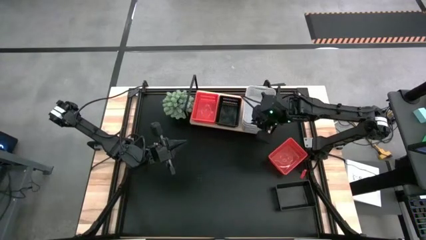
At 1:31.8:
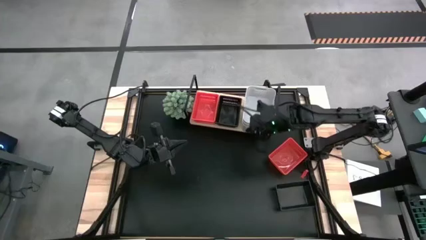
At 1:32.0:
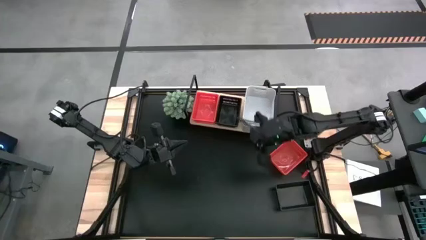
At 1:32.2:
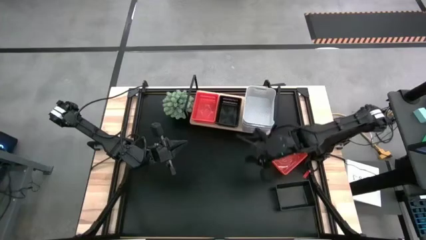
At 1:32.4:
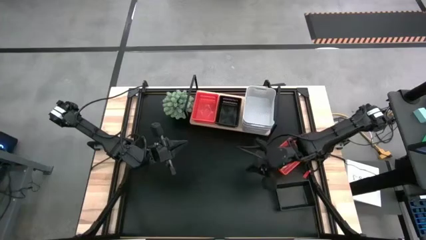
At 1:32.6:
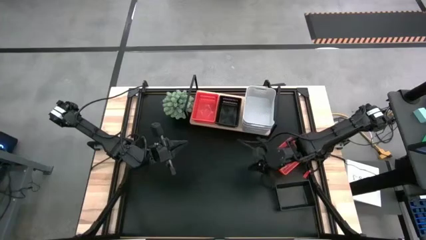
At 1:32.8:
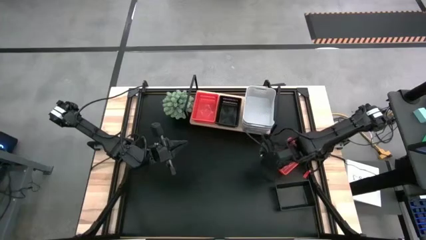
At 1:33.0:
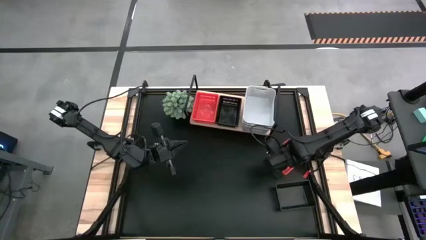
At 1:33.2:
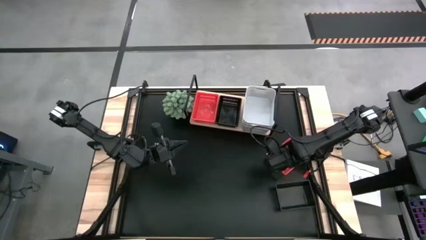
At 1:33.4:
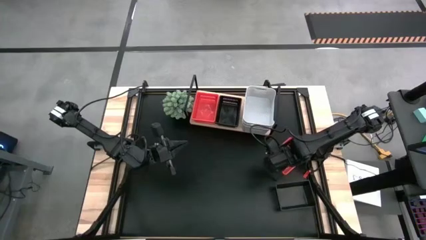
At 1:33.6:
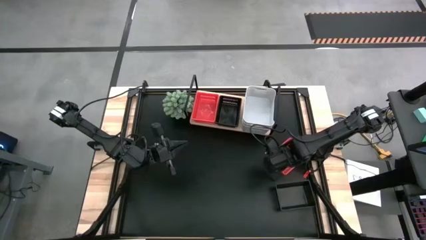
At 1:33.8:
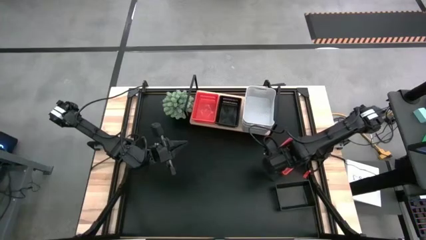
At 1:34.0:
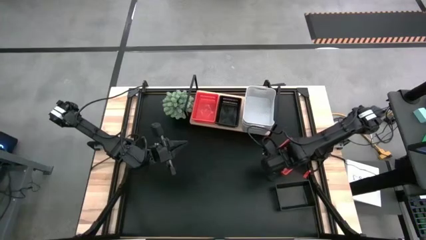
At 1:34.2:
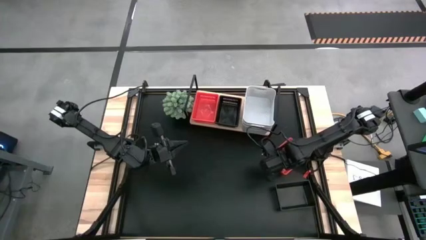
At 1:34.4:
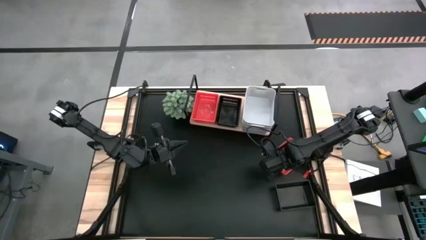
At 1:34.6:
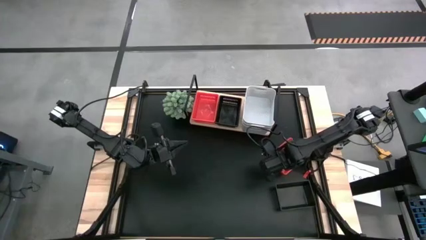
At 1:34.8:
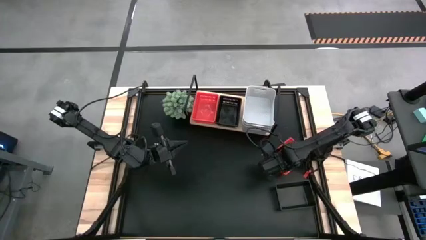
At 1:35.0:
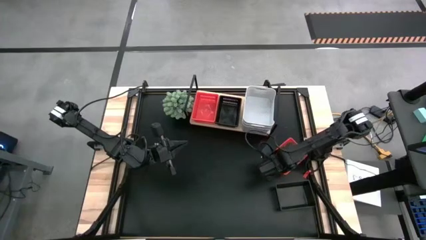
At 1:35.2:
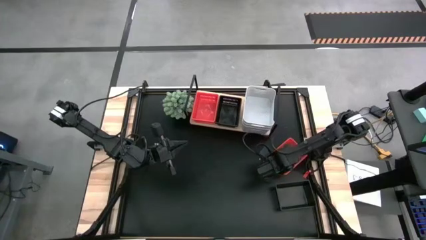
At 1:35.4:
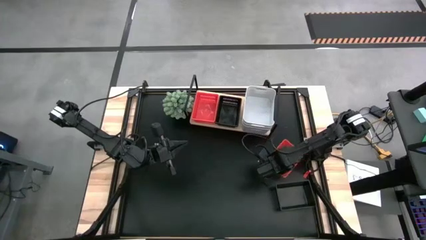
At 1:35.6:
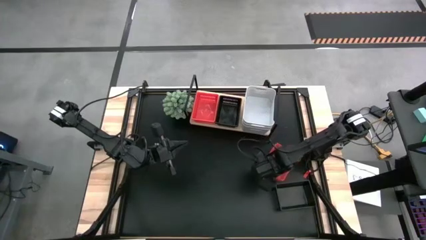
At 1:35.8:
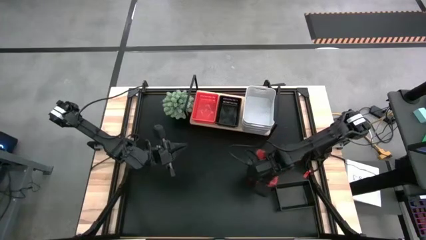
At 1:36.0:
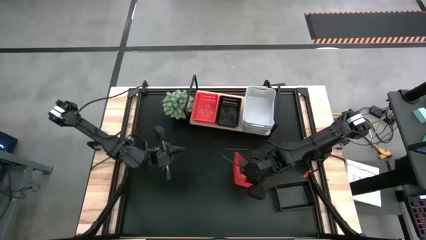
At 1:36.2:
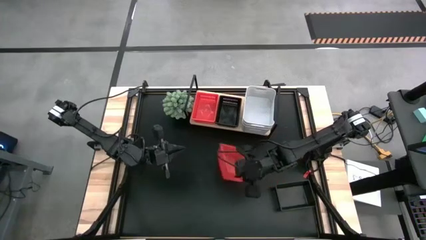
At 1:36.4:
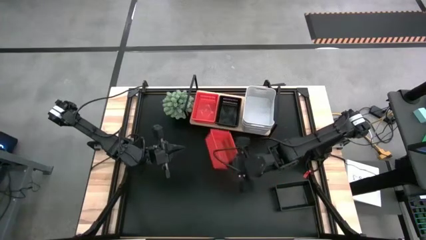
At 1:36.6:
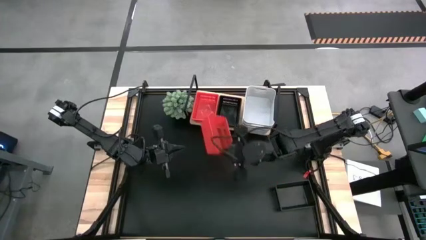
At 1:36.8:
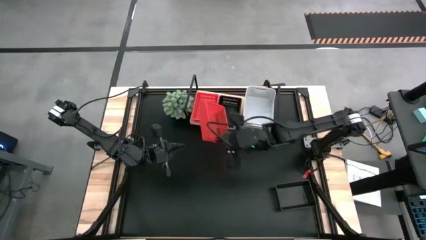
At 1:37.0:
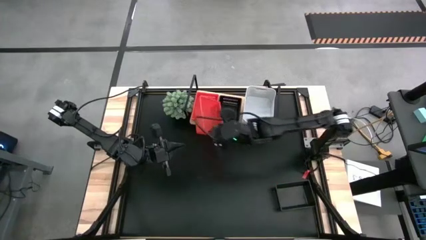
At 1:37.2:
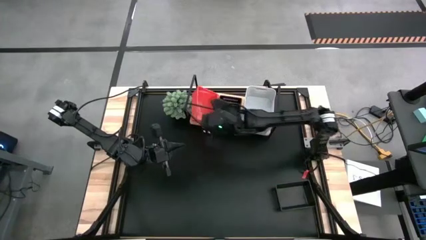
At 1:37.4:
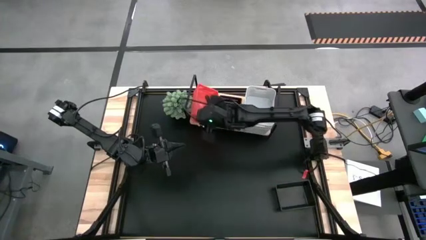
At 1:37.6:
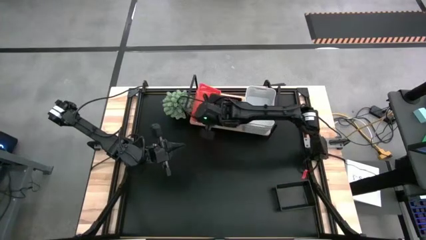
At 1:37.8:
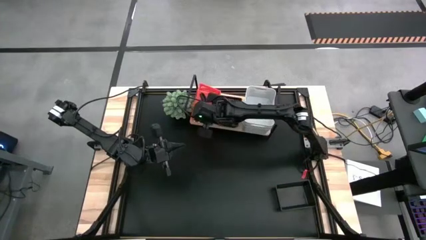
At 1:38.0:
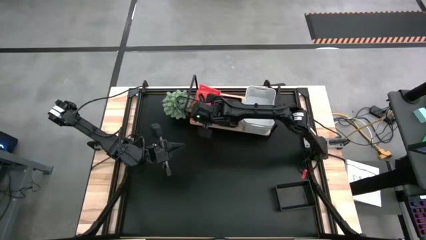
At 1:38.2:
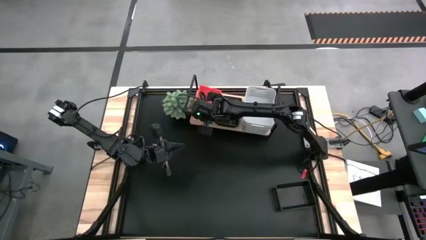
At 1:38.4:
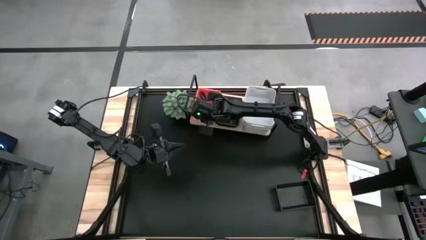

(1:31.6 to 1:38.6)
Task: Stack baskets on shelf by color
Stack the red basket on top of the red basket on the shelf

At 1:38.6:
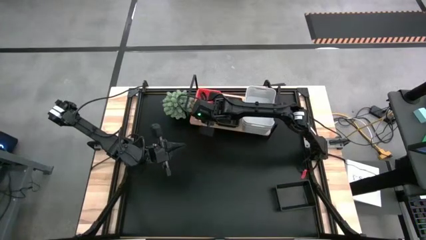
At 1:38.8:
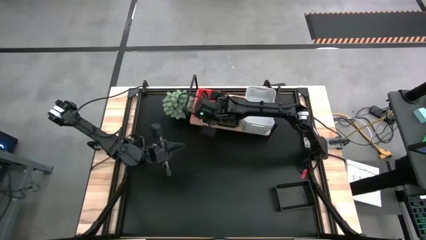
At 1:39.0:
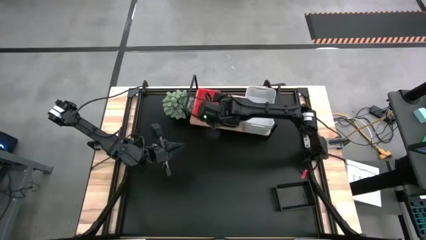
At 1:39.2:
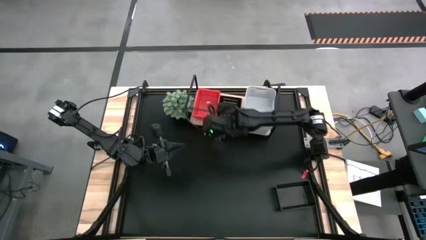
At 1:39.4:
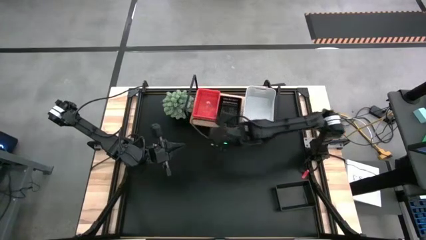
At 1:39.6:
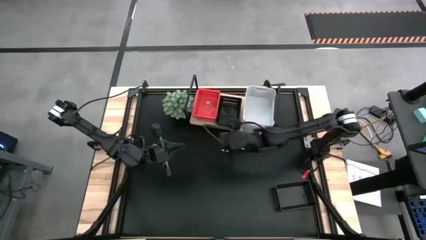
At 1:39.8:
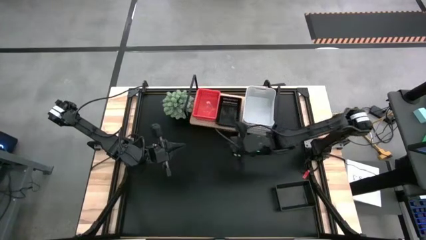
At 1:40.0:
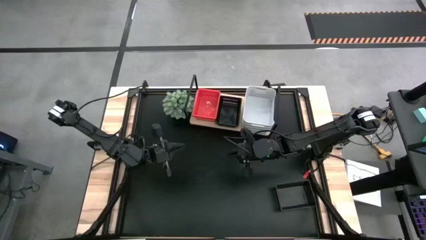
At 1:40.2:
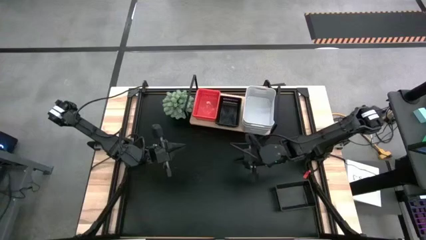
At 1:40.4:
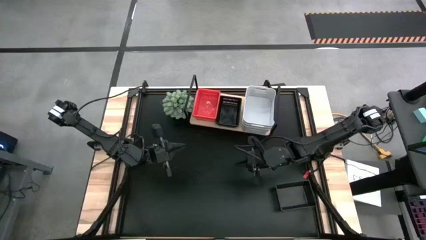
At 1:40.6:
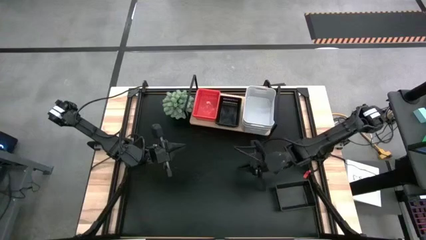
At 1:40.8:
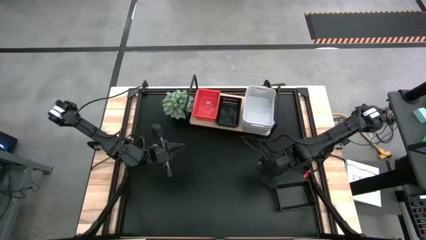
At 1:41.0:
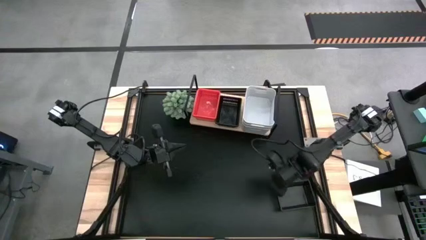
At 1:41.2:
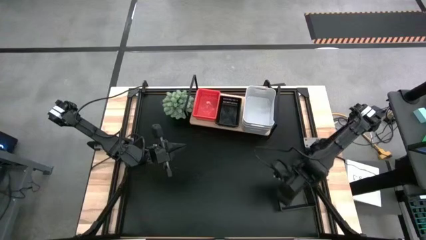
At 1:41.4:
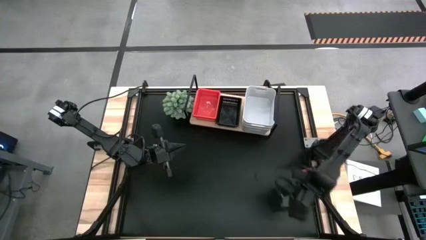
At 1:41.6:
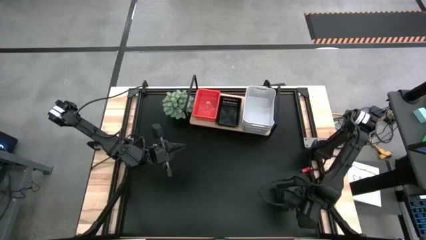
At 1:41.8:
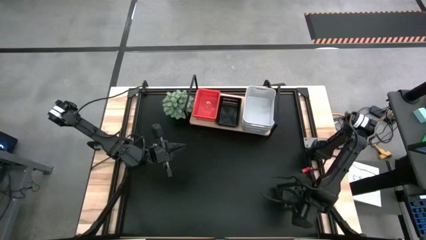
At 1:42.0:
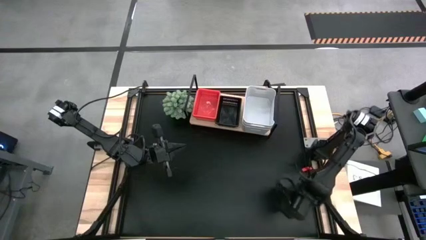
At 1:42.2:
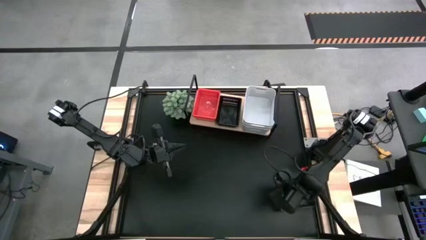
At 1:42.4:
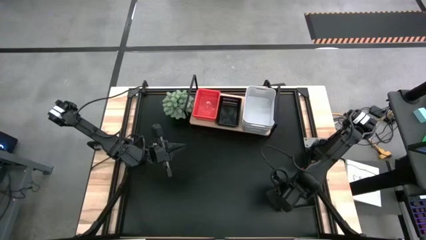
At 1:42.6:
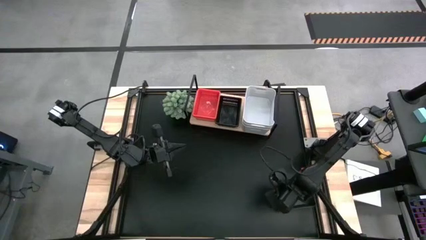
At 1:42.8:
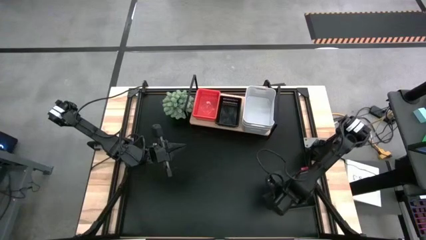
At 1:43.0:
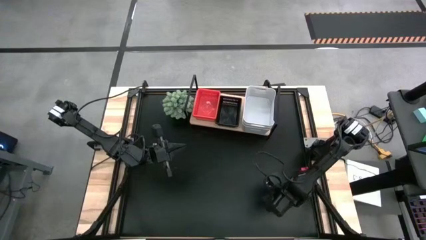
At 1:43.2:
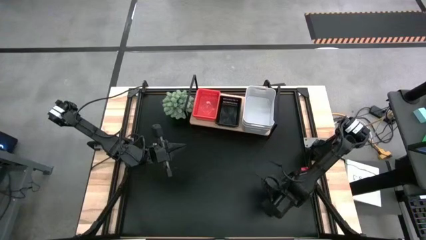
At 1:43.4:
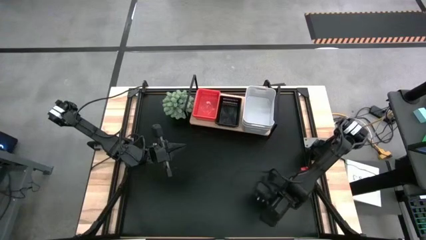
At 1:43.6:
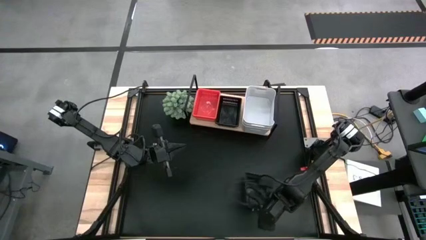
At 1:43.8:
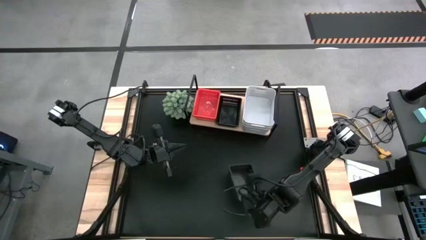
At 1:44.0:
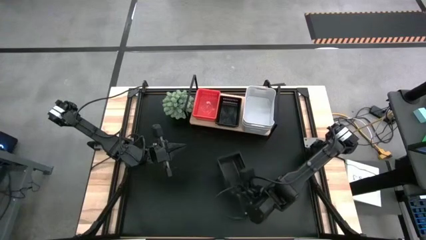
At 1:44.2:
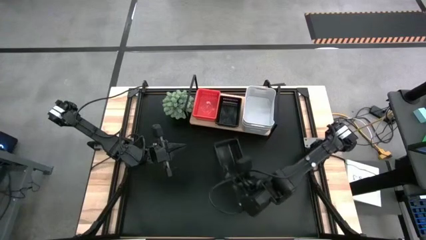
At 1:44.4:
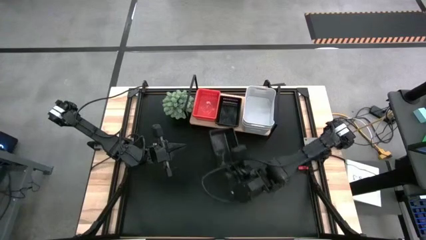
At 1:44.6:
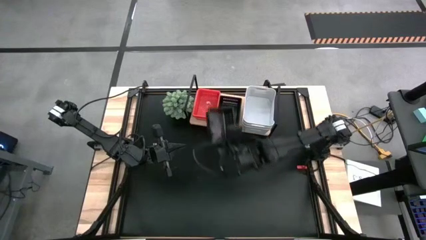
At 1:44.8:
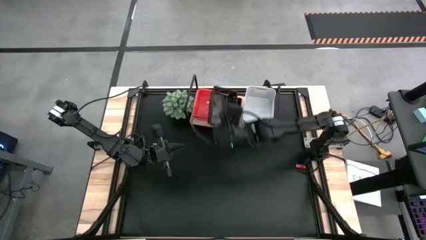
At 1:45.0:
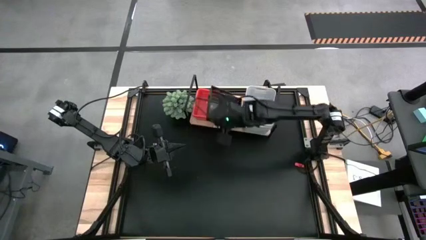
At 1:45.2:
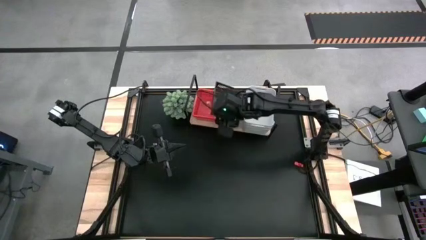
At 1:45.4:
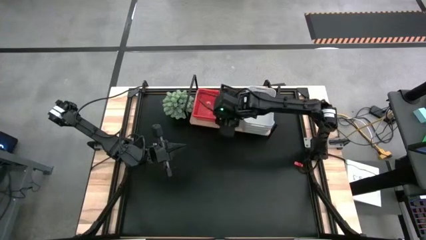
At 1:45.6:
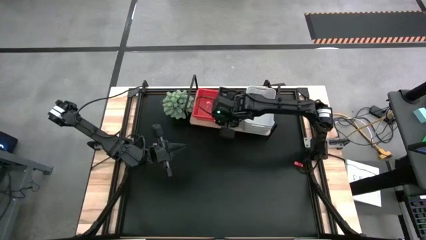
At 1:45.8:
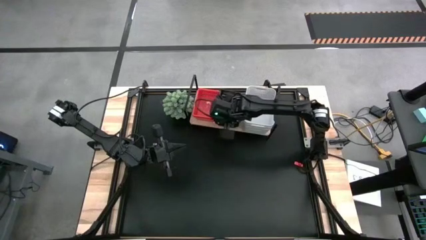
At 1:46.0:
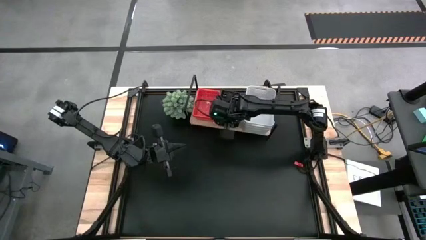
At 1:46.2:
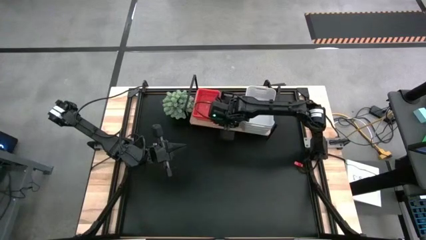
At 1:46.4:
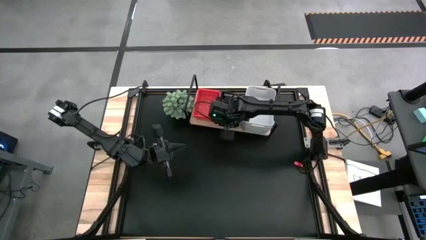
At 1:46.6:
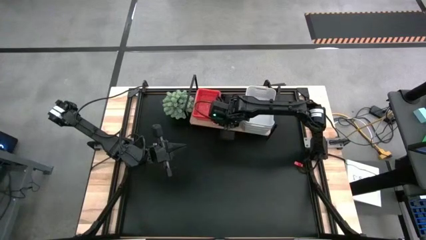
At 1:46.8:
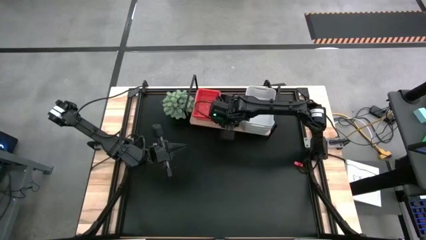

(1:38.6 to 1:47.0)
Stack the black basket bin on the black basket bin on the shelf
